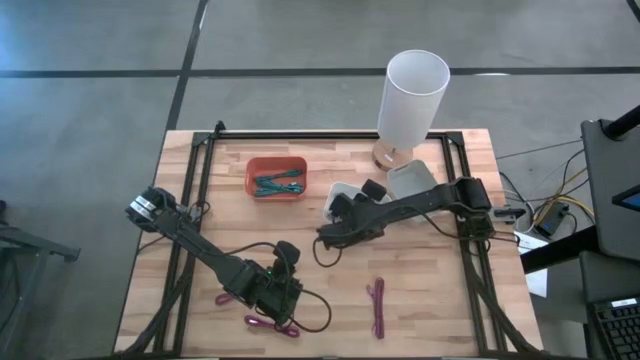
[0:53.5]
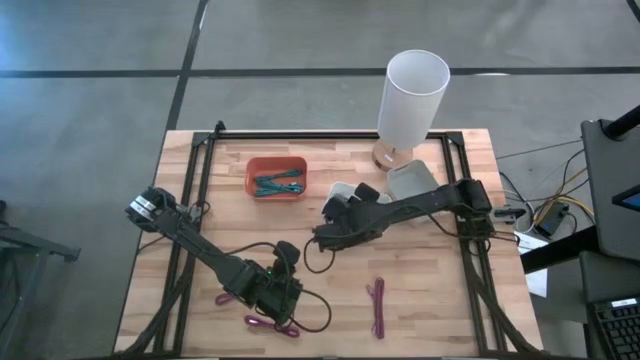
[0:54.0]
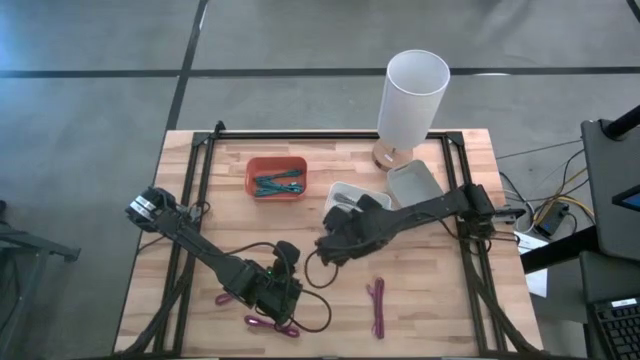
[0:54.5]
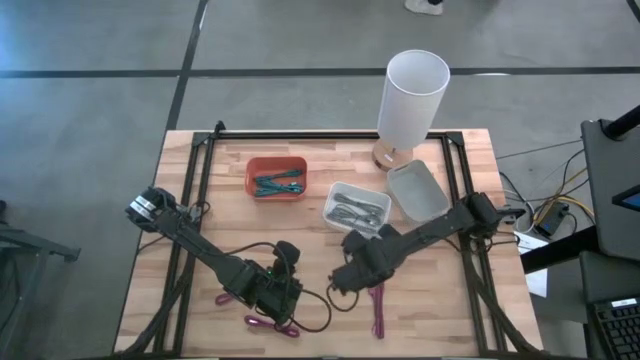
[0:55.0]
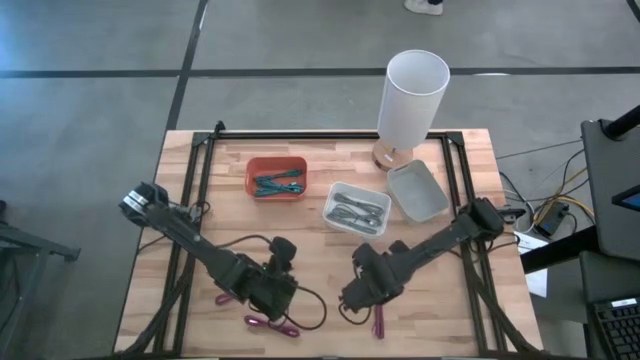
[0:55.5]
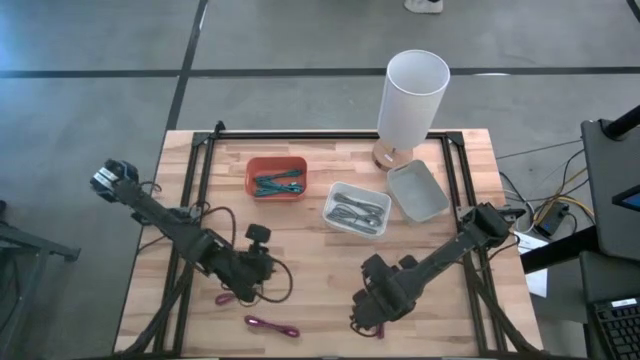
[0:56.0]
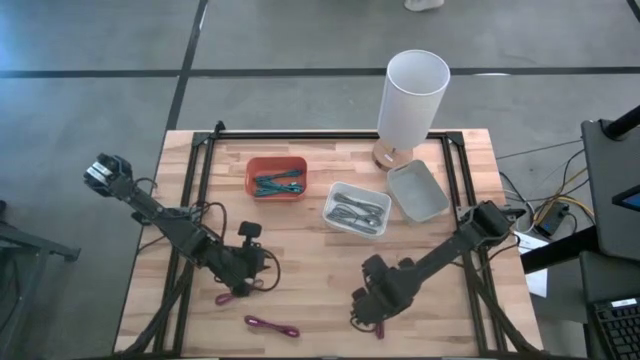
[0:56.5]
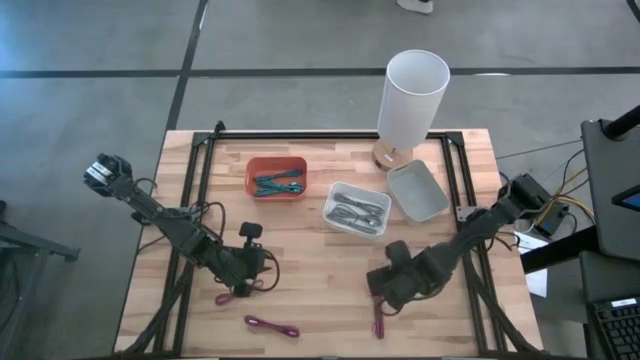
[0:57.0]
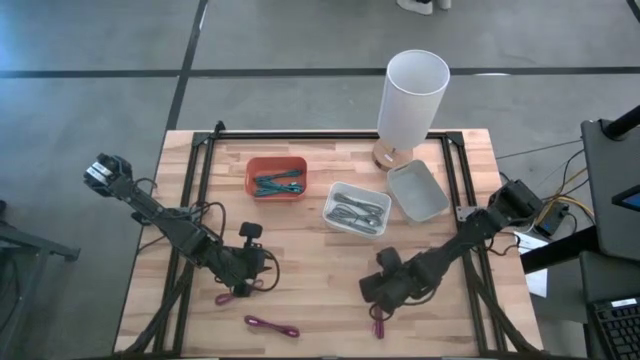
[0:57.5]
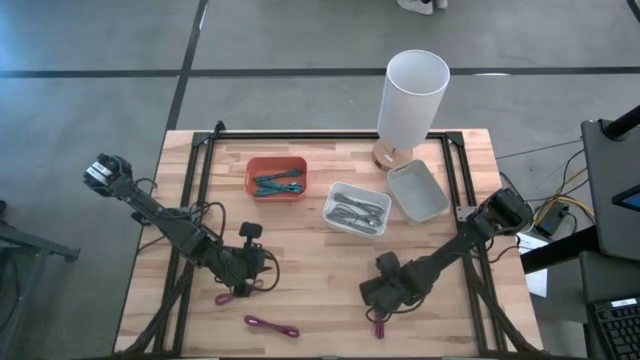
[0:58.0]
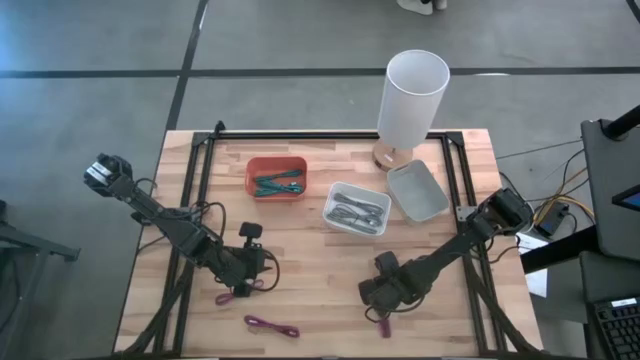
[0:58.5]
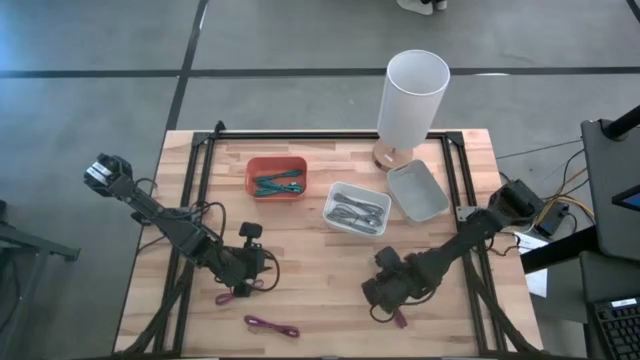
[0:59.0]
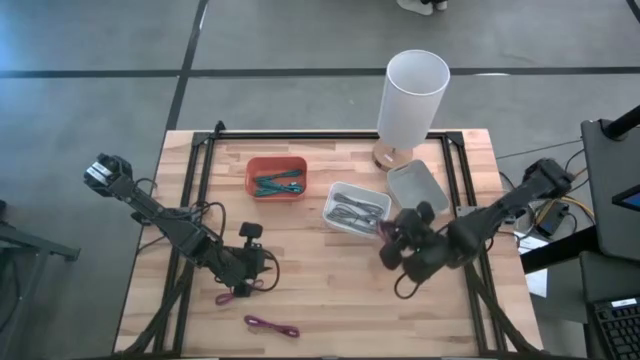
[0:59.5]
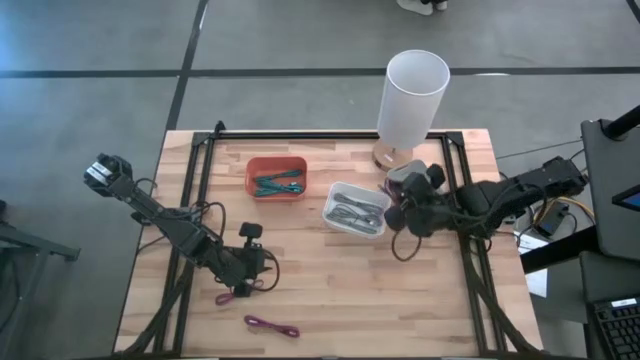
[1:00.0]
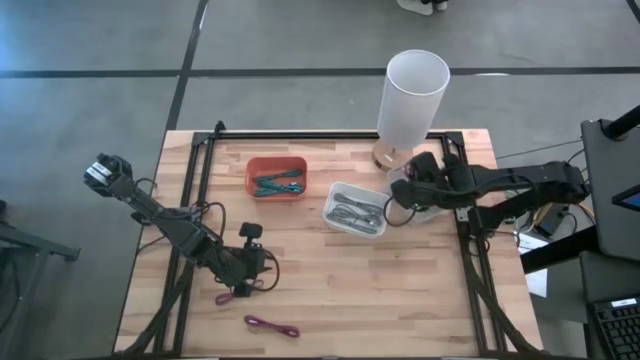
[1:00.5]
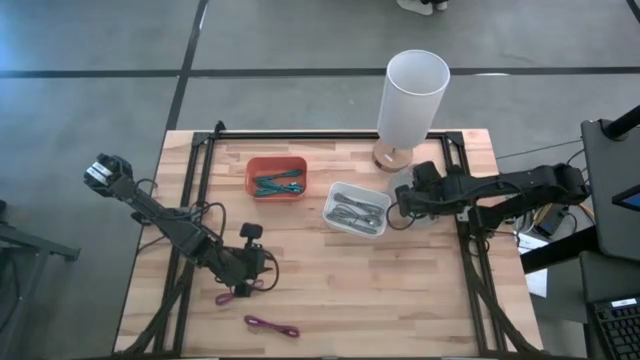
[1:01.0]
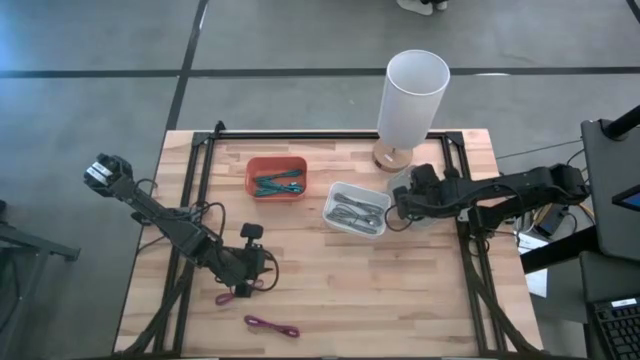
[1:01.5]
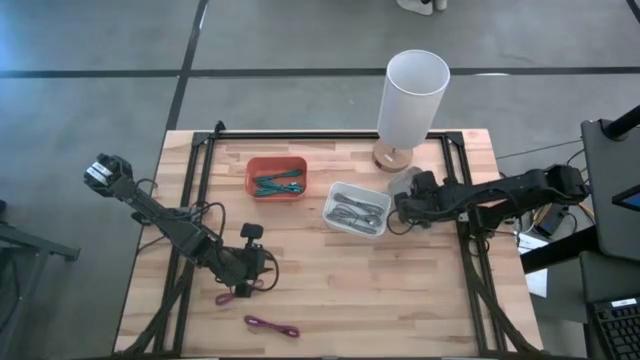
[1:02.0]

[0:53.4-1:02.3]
Task: Pick & Place USB Port
Put the bottom right pink charger cable into the gray bin

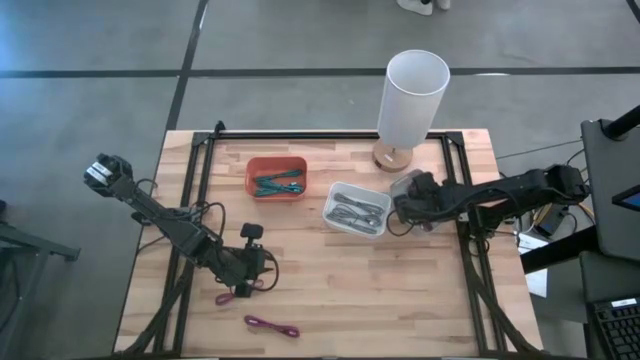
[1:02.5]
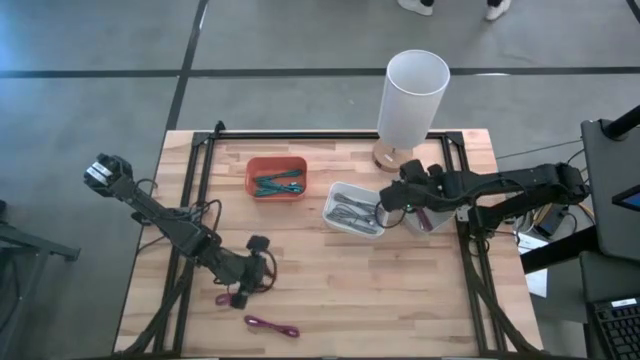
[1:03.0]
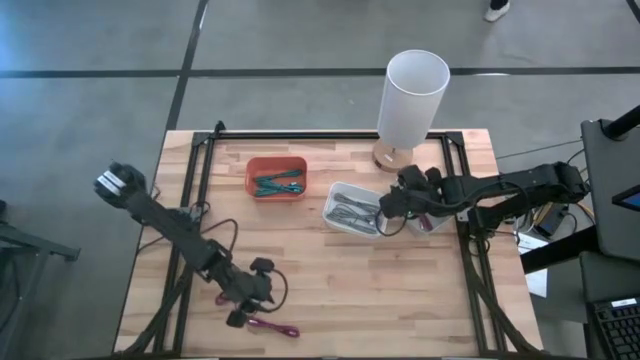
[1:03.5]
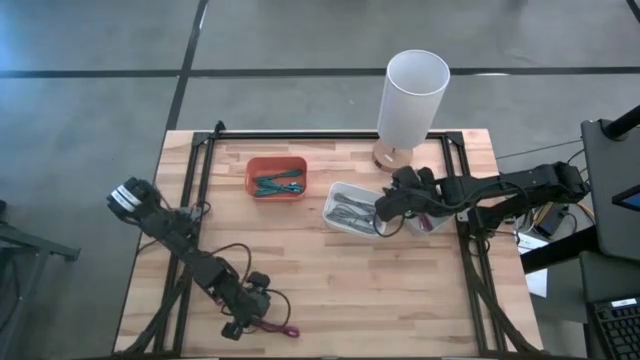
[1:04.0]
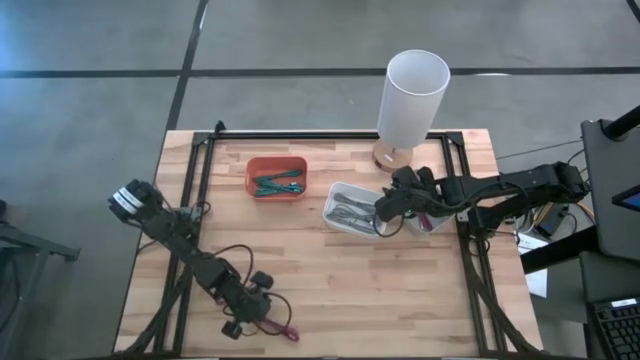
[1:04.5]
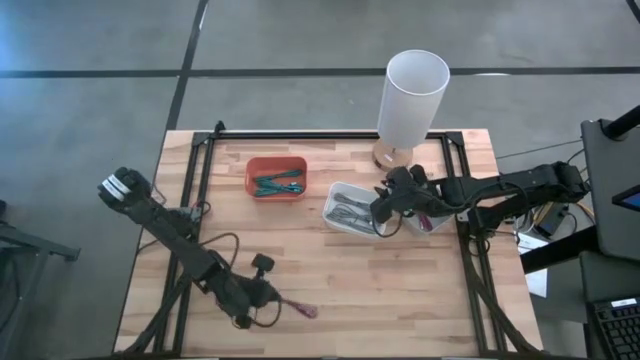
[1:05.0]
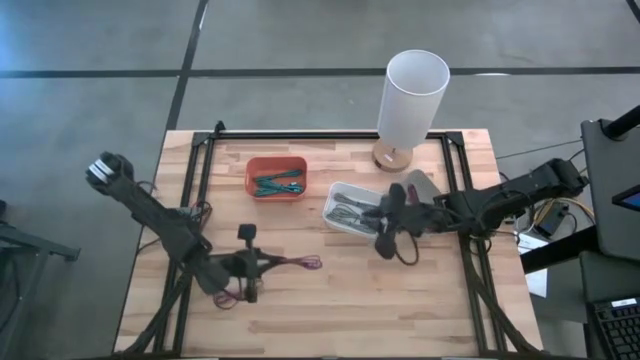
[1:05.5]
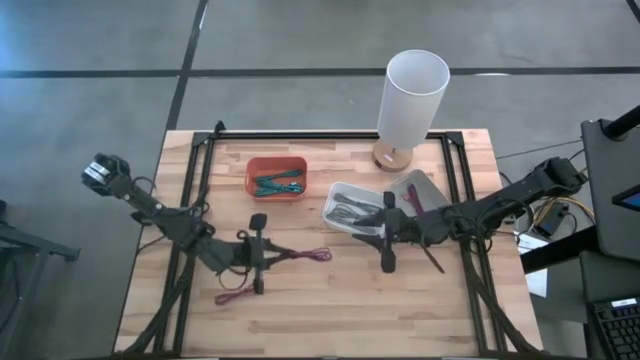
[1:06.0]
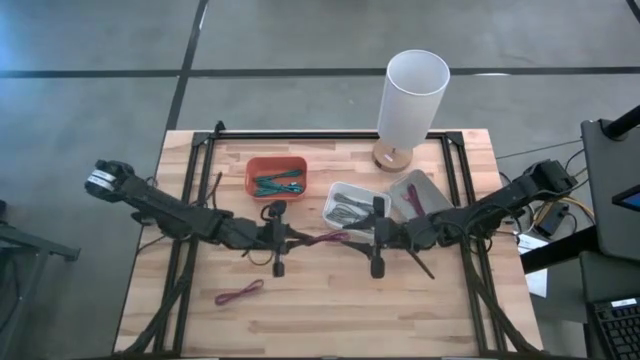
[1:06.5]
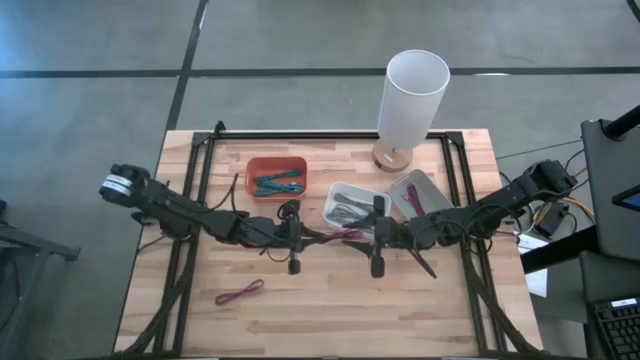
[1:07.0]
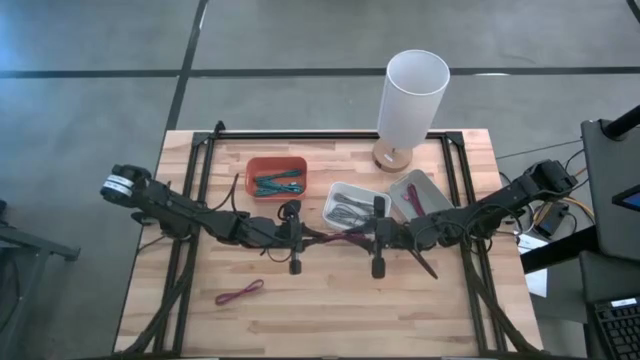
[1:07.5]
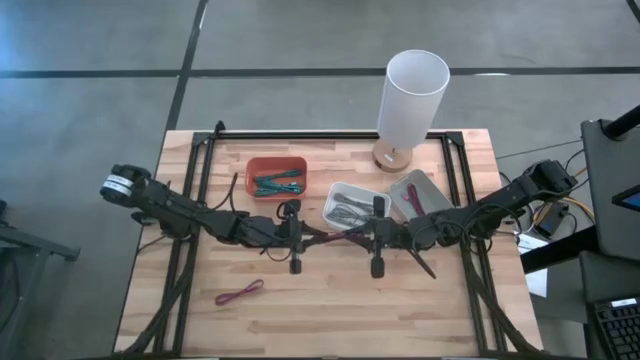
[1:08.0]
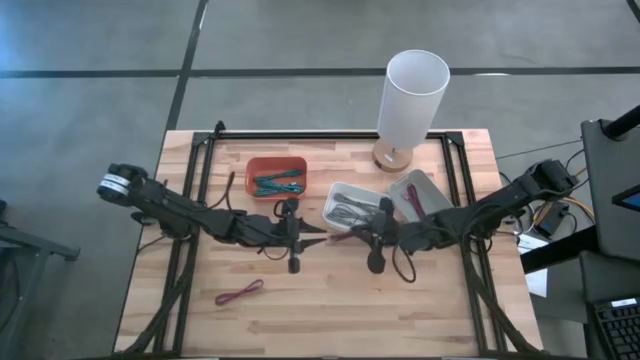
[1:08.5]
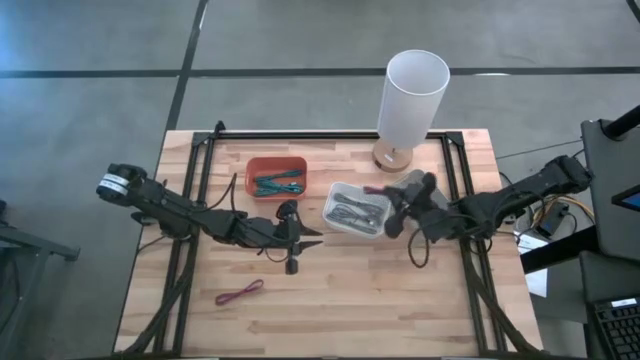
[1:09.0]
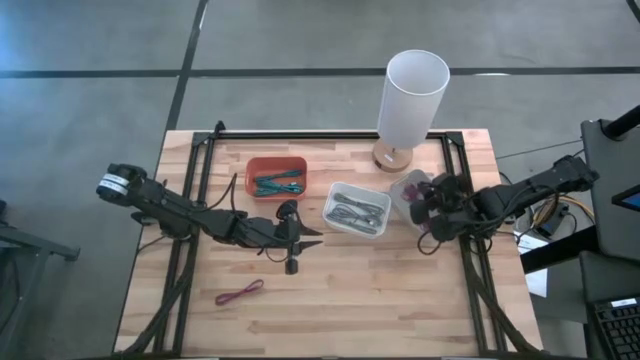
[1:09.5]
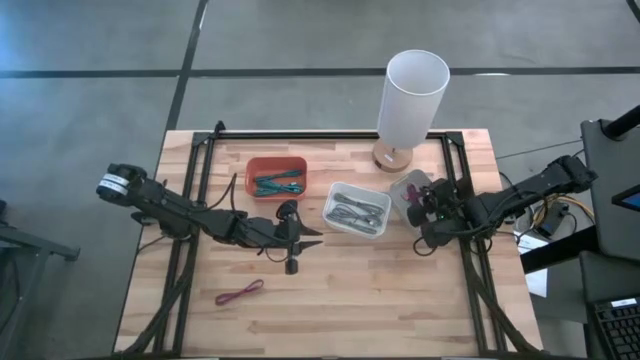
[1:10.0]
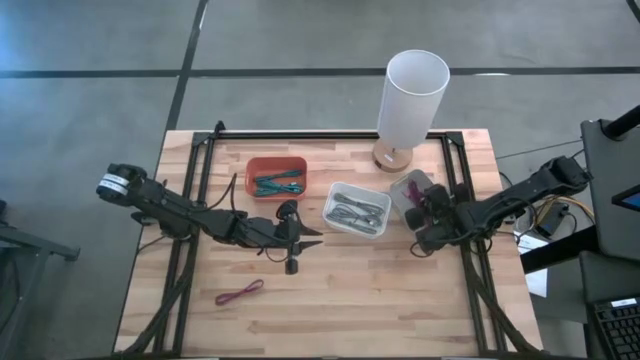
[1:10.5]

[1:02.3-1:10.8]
Put the bottom pink charger cable into the gray bin

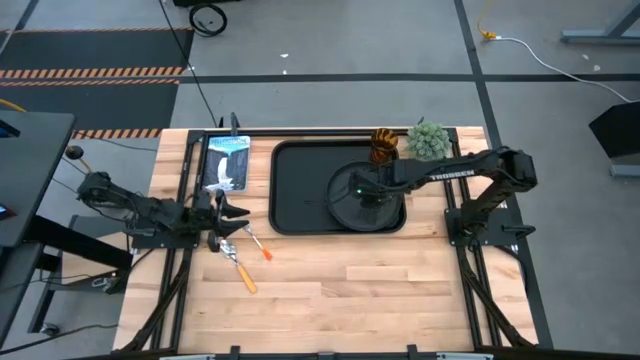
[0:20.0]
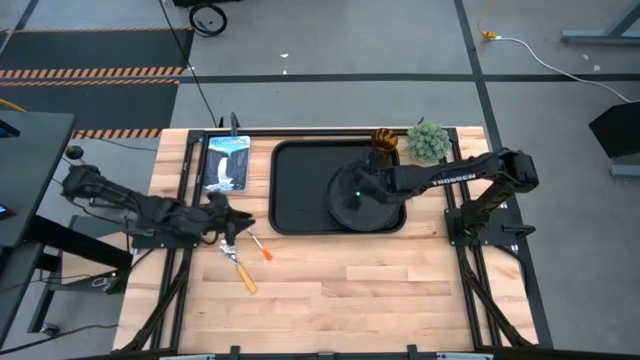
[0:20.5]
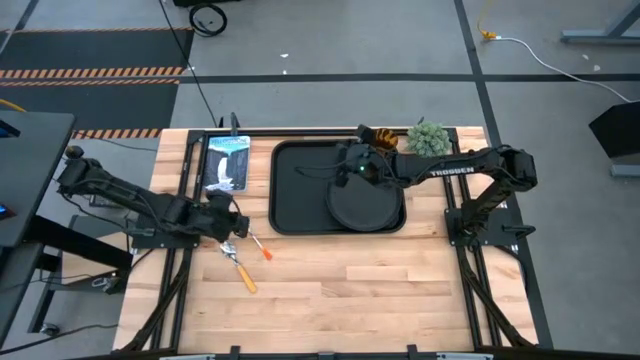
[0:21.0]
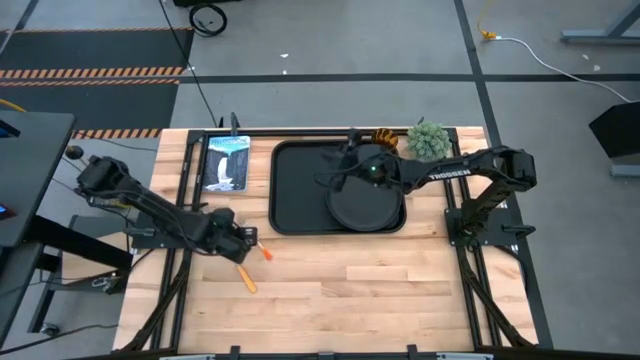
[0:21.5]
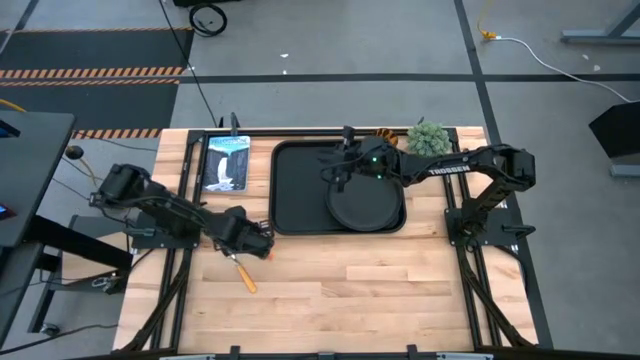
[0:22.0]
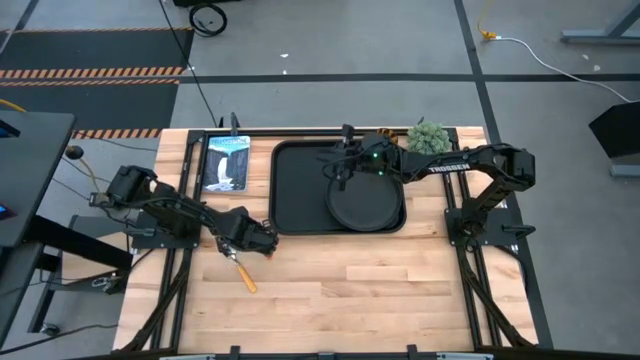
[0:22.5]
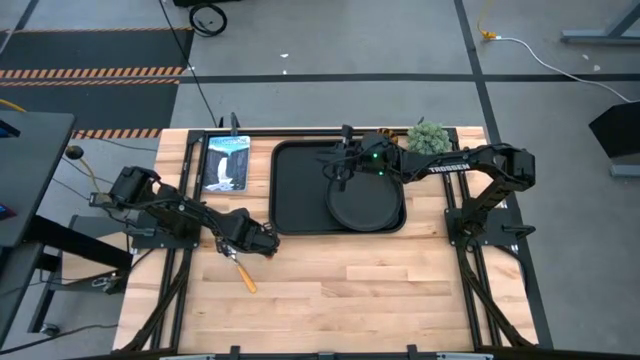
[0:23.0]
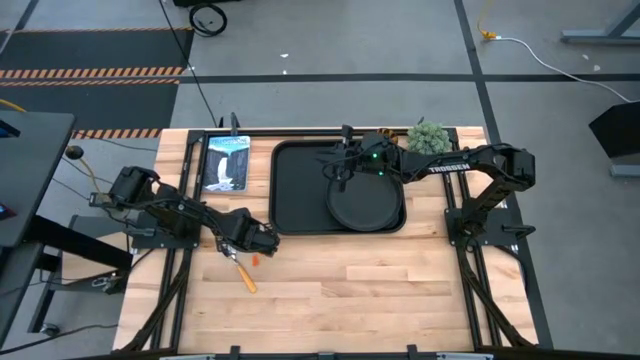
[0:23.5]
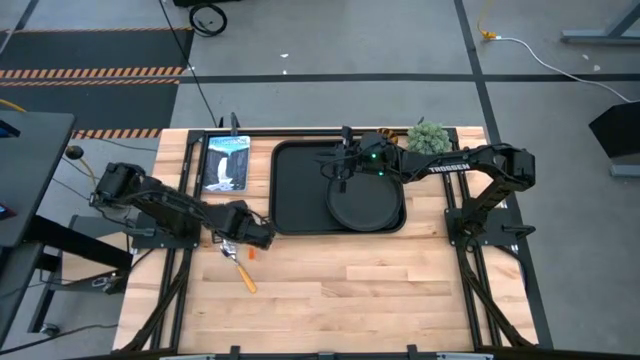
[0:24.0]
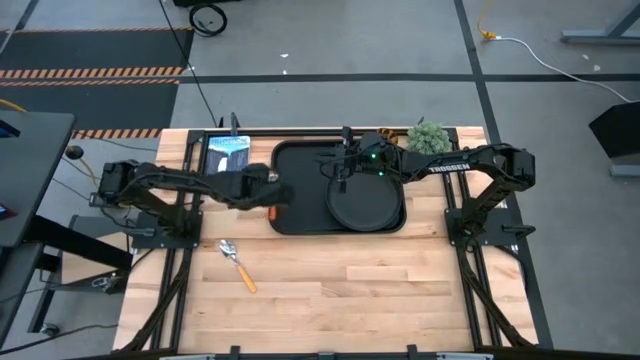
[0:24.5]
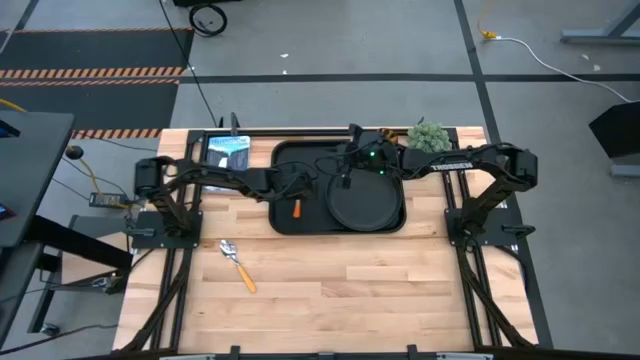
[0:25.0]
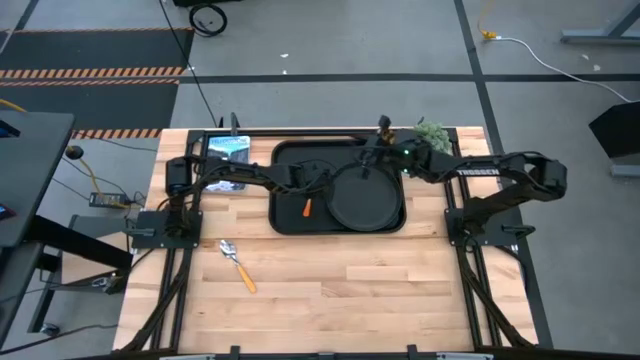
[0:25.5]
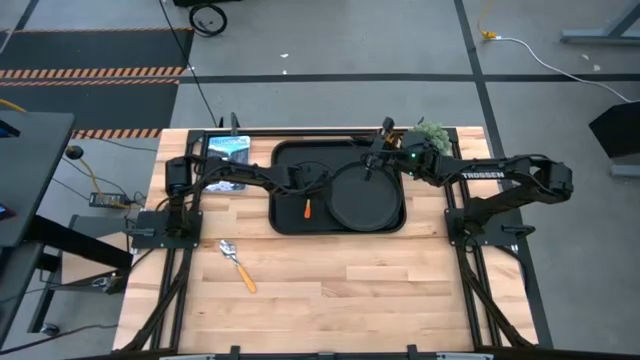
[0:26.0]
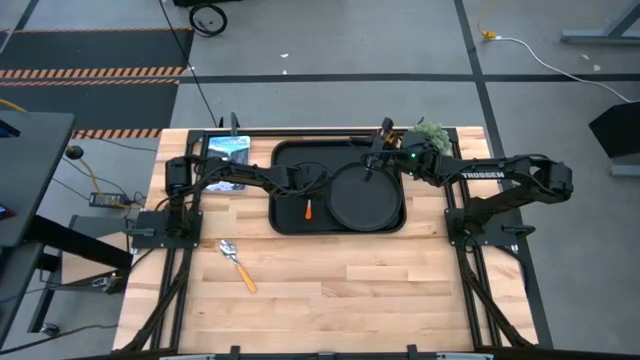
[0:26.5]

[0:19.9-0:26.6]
Task: Pick and place plate/cup/fork/spoon on tray
Put the orange fork on the black tray to the left side of the black plate
